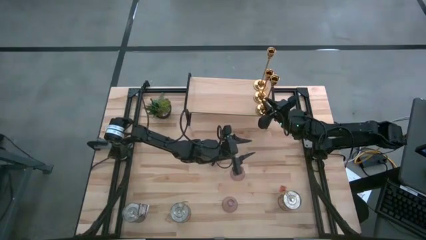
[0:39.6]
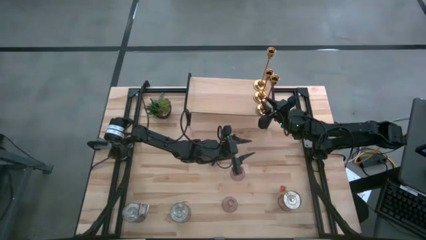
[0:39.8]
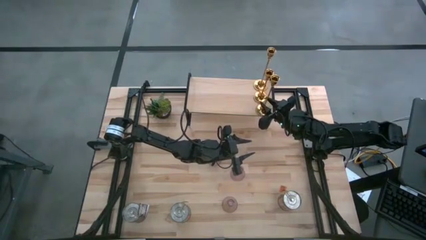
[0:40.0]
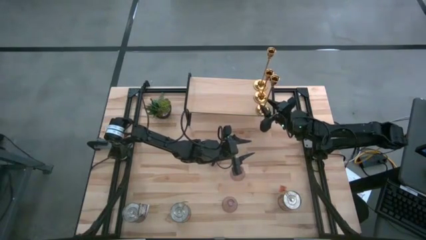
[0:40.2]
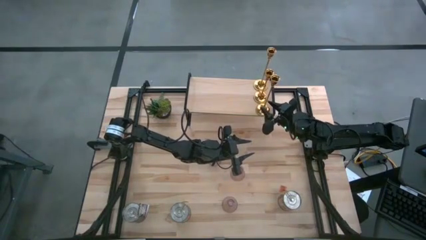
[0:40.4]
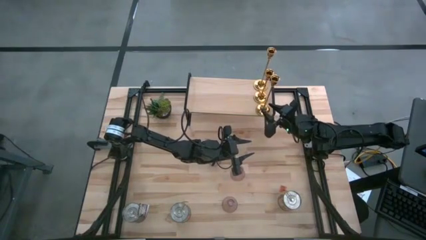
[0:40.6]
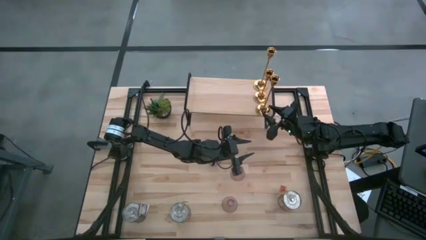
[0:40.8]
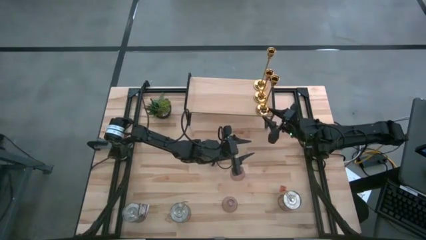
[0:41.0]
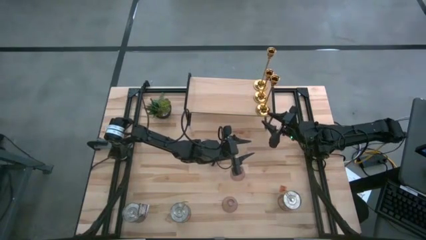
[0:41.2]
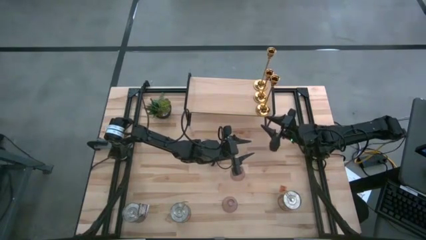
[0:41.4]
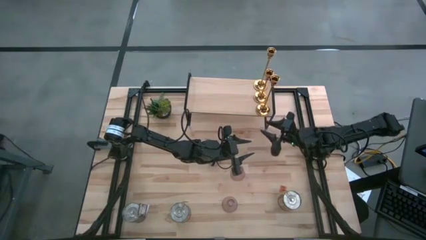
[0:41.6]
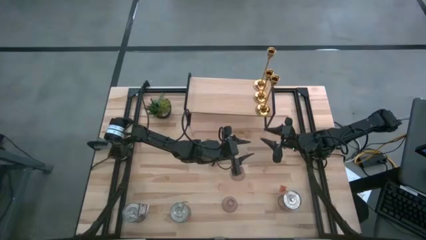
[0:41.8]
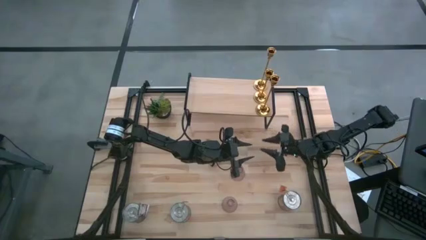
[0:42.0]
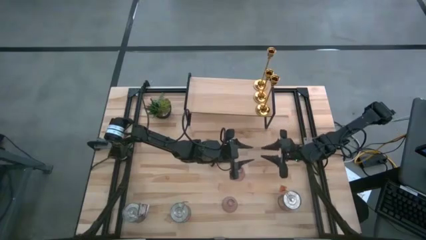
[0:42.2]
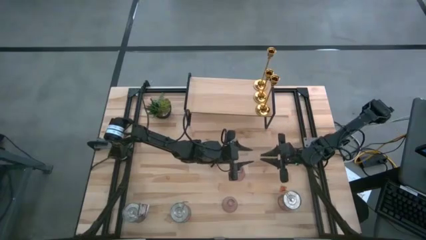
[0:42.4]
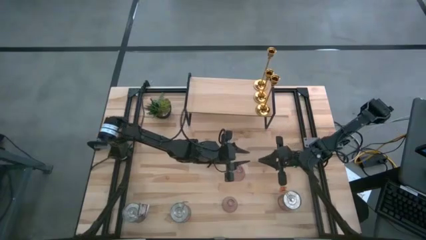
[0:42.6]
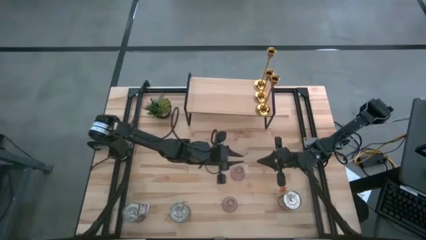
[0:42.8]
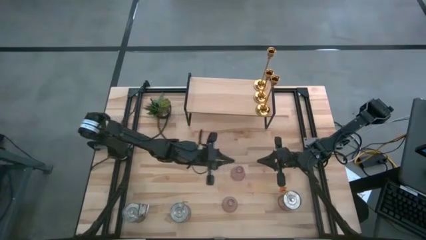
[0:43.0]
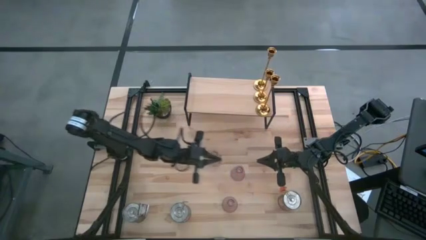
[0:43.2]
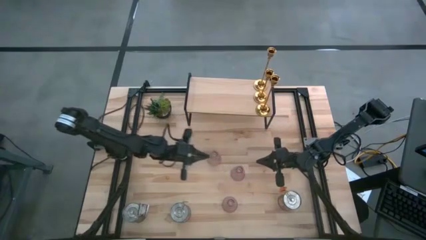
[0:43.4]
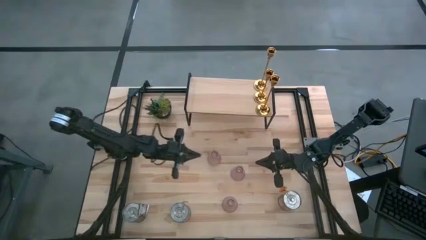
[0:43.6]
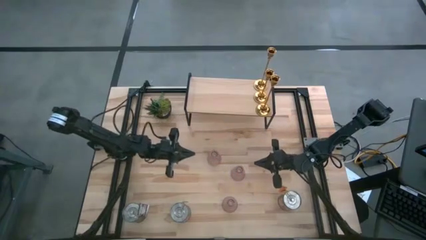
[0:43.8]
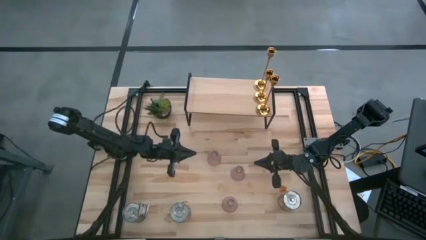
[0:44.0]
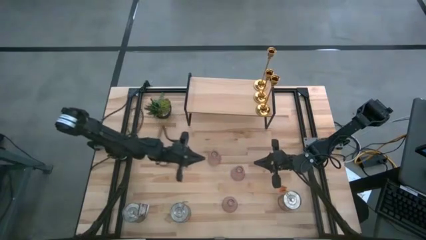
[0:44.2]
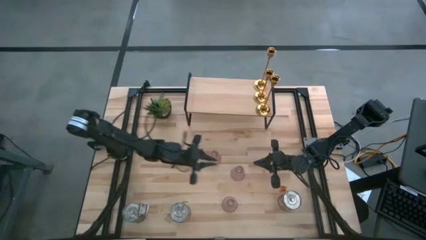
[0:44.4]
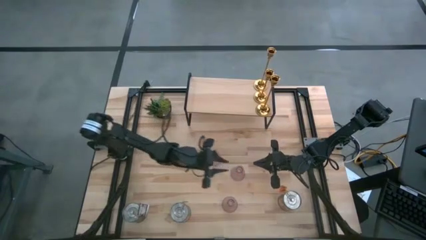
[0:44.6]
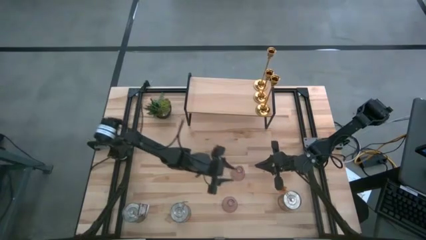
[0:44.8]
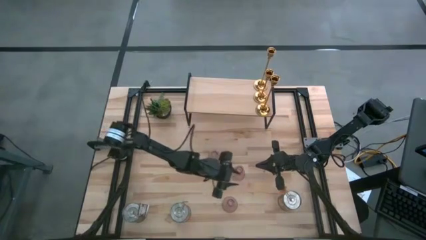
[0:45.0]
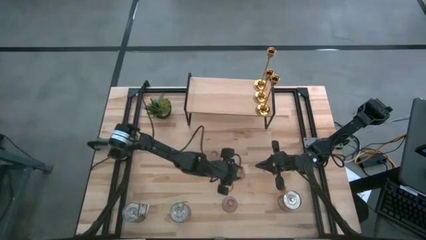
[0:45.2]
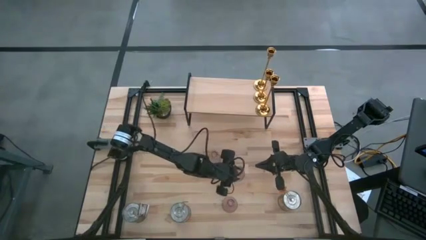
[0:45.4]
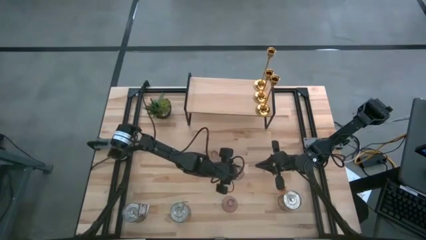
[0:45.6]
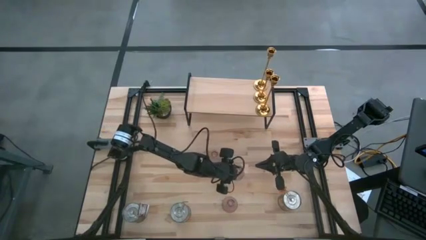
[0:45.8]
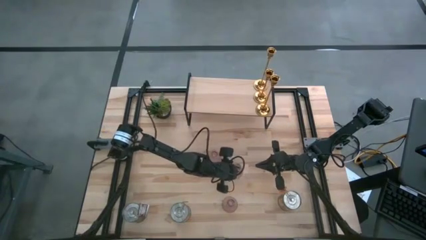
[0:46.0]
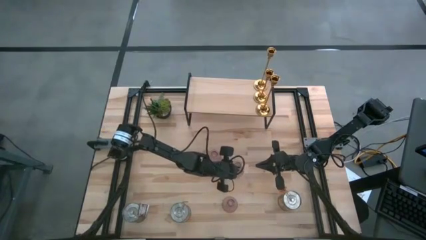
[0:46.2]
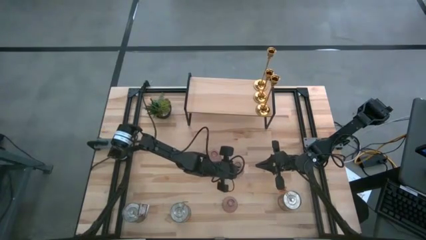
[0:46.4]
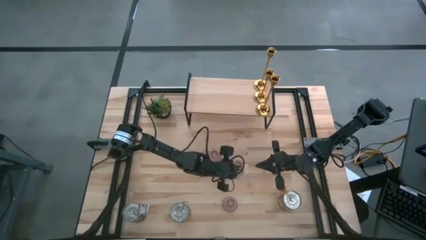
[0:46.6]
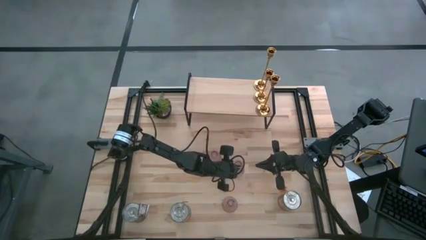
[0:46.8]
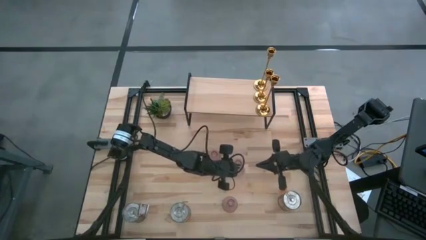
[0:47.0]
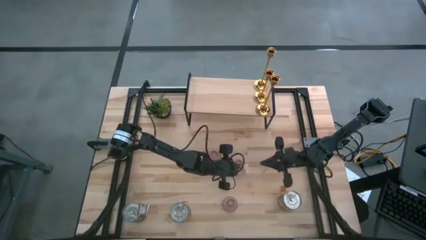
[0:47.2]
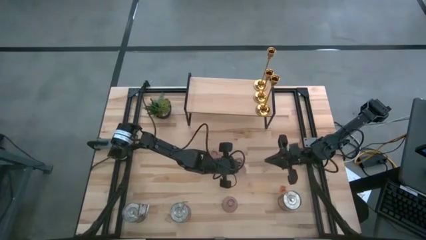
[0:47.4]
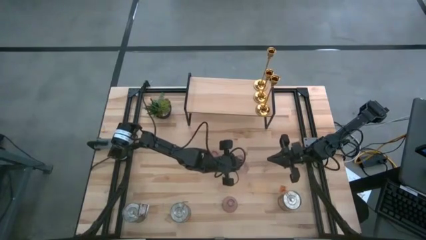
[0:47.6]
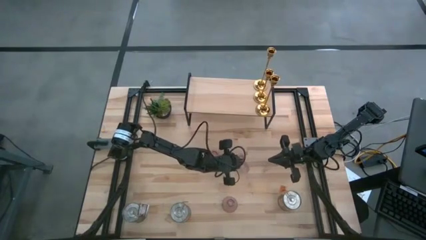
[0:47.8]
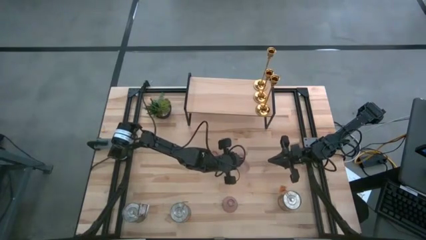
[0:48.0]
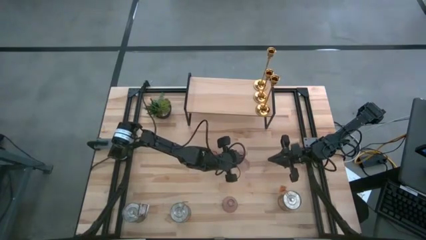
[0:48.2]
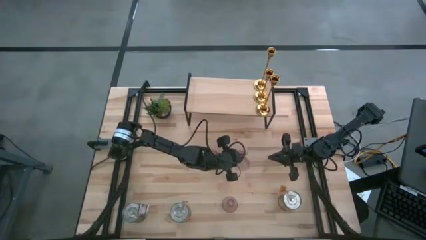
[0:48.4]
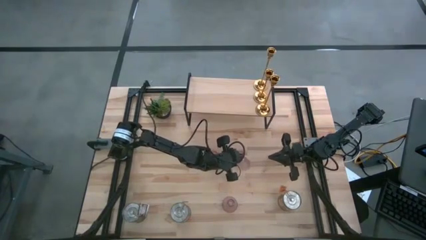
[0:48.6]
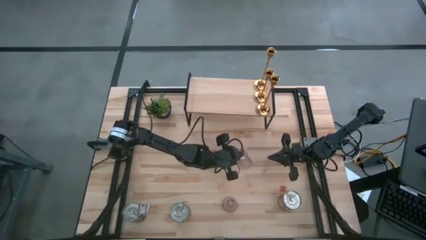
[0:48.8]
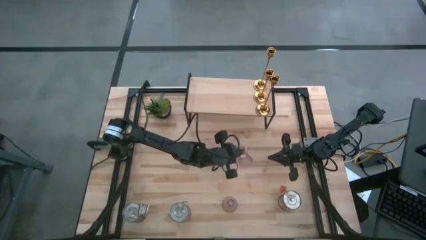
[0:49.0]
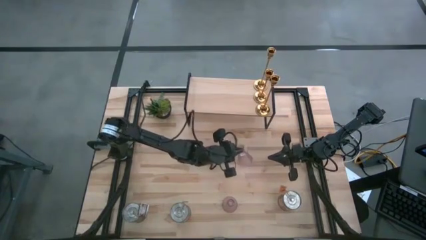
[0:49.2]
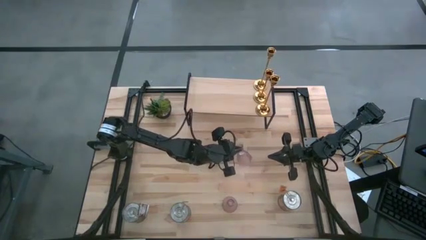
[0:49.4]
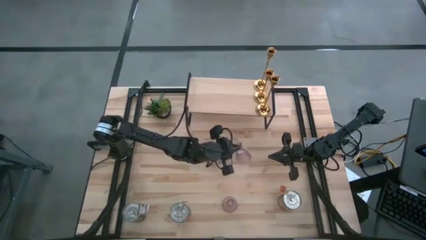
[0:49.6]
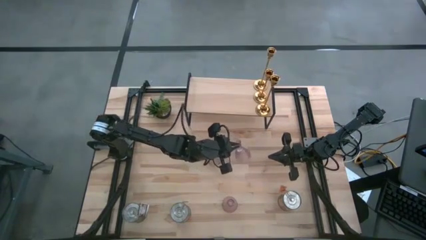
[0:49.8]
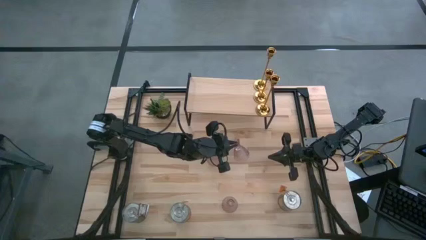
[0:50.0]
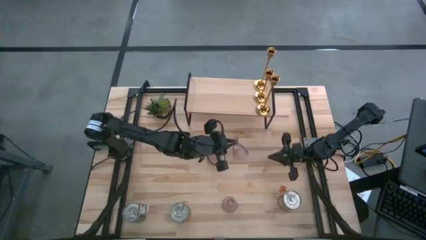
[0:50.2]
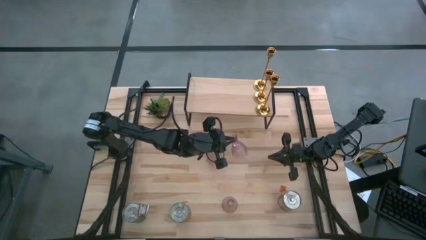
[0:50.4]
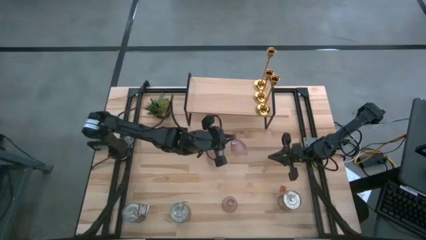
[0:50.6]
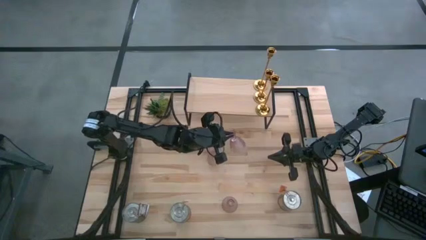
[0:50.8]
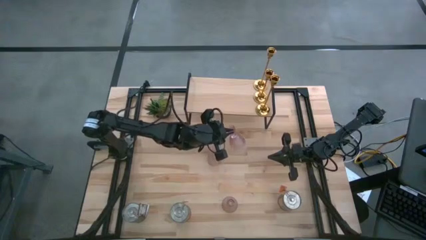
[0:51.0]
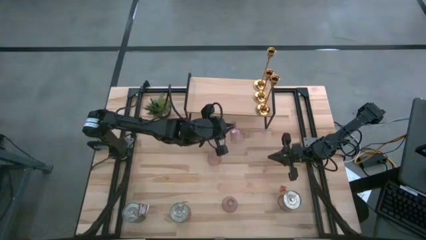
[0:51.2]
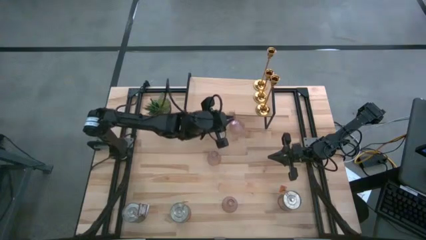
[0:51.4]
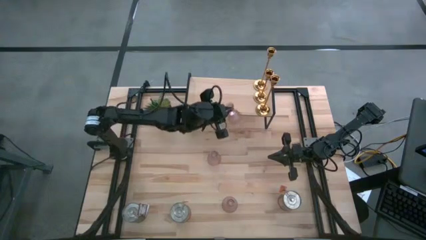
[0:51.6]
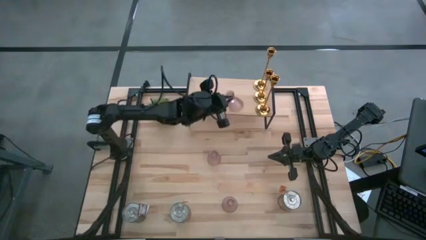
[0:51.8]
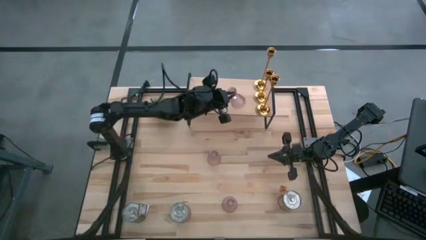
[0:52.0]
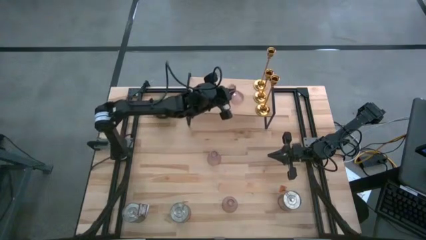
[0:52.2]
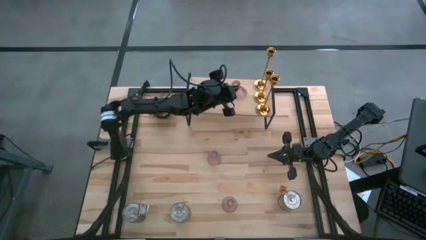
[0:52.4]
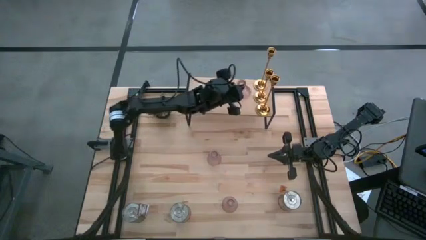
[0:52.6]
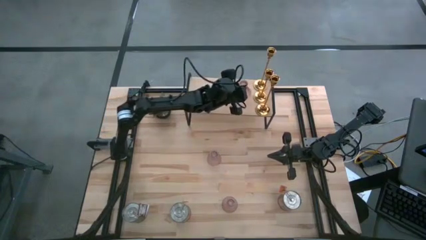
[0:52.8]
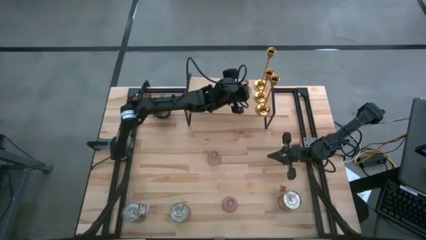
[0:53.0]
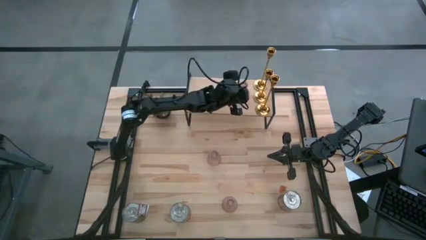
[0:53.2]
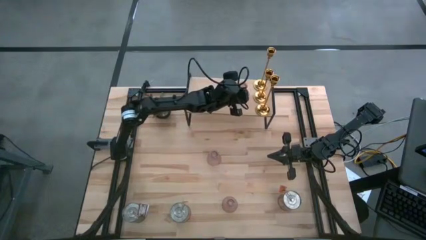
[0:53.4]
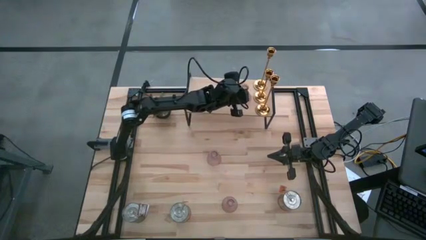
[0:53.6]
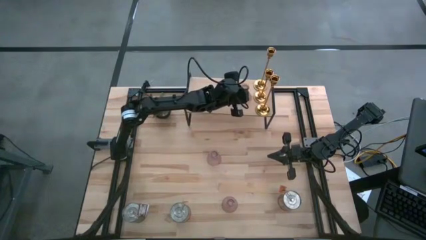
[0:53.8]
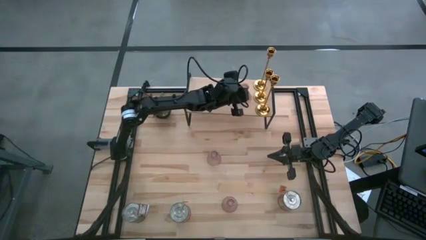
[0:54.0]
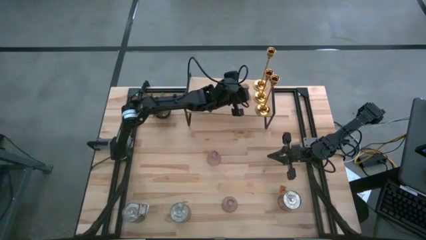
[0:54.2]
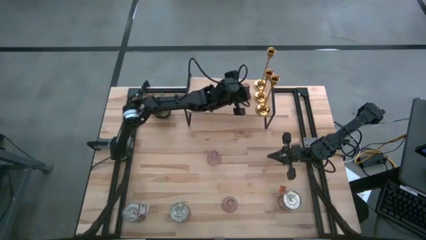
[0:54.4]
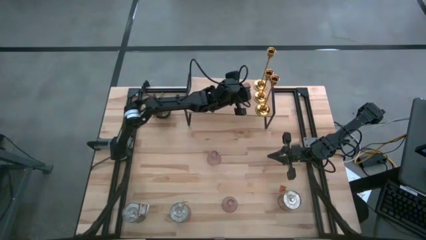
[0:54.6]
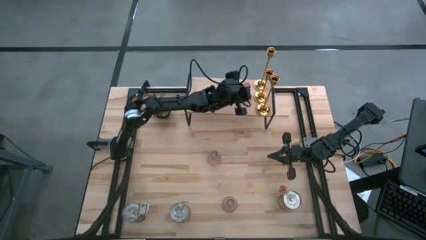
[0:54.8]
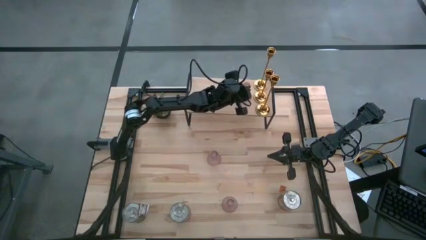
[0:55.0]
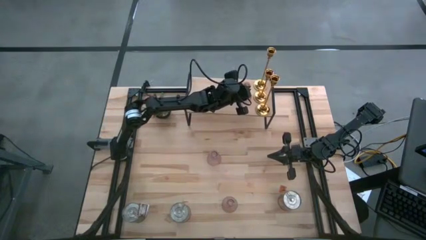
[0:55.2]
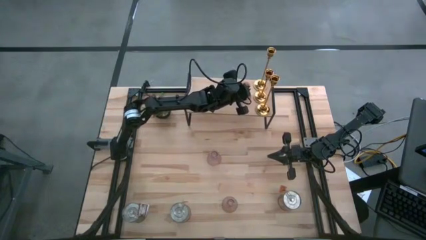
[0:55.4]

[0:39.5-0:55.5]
Task: Pick & Place candle stick holders
Put the middle red candle holder on the shelf
